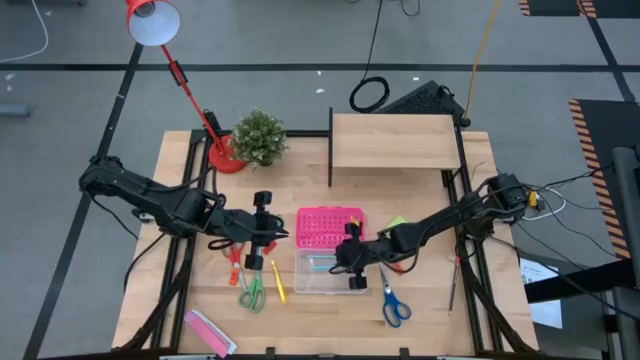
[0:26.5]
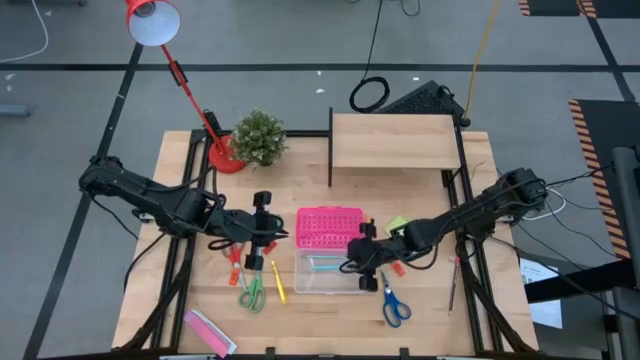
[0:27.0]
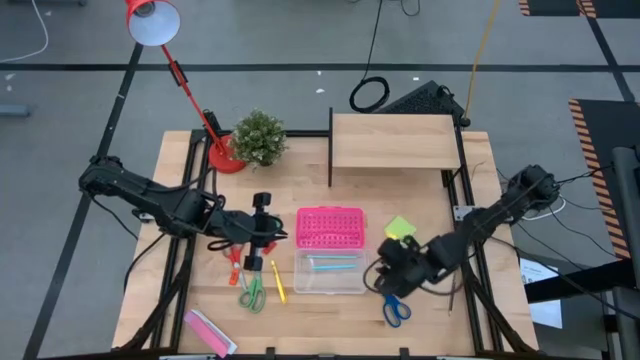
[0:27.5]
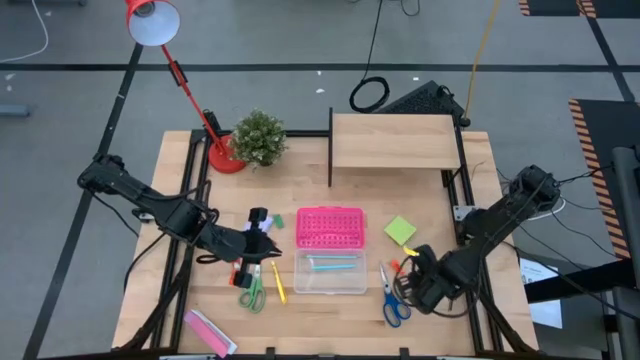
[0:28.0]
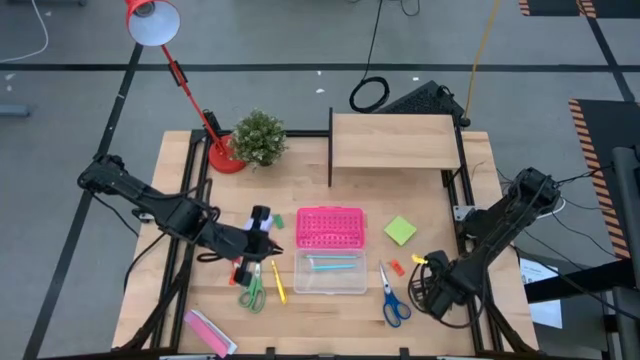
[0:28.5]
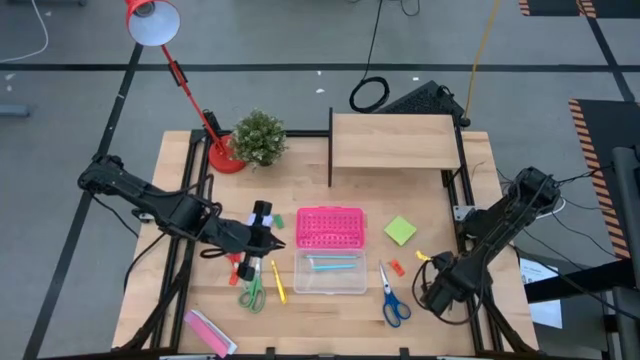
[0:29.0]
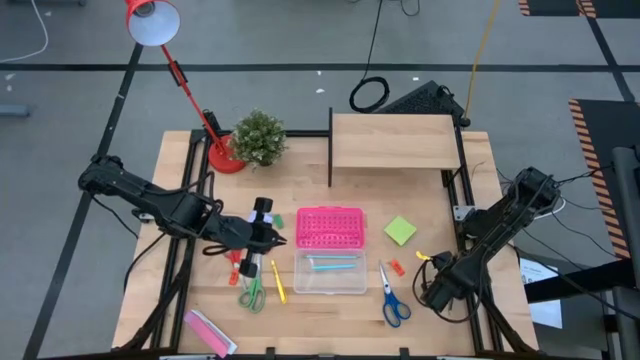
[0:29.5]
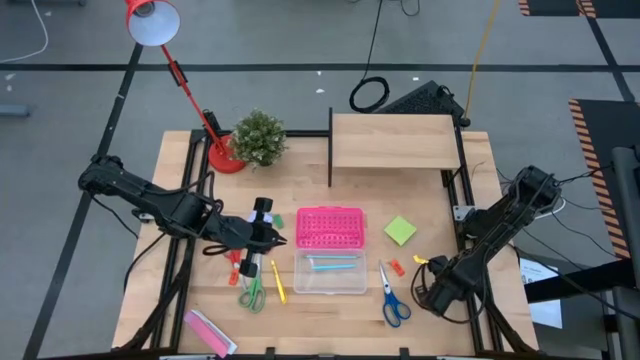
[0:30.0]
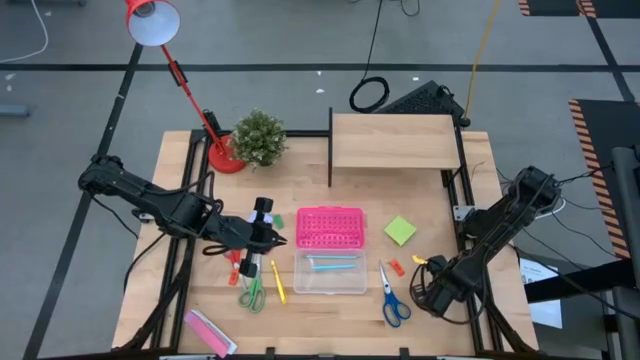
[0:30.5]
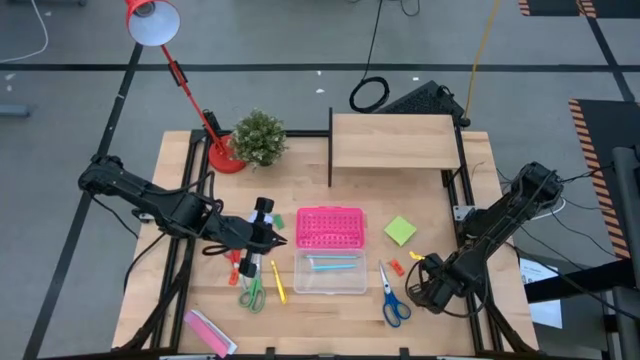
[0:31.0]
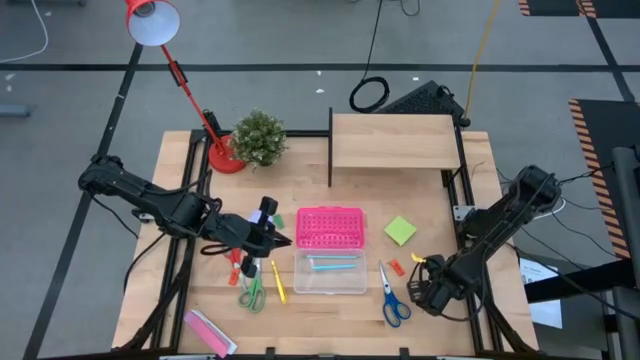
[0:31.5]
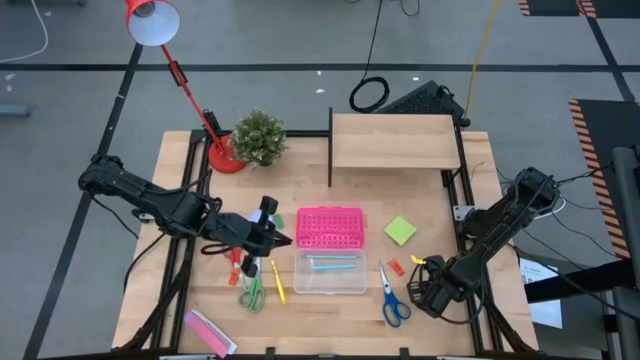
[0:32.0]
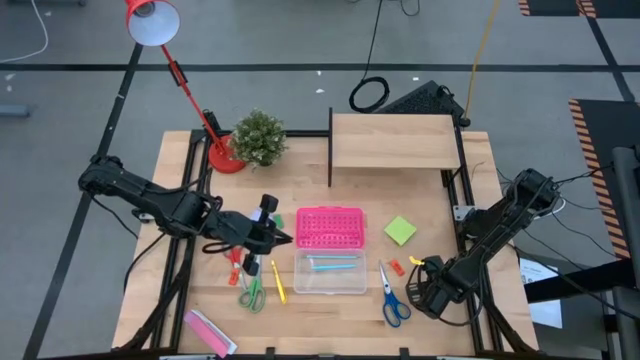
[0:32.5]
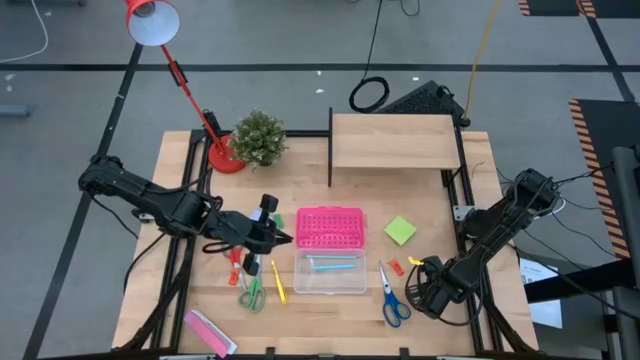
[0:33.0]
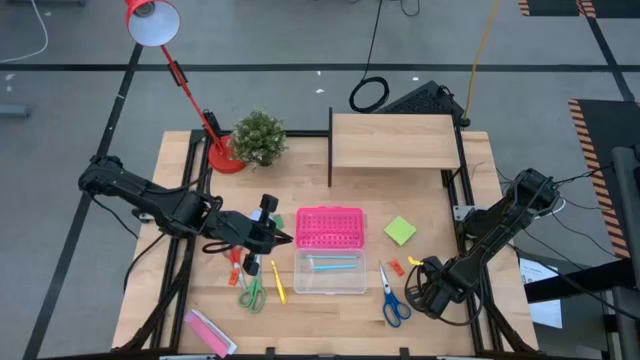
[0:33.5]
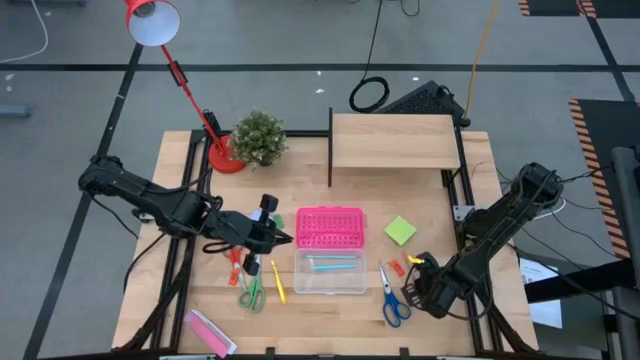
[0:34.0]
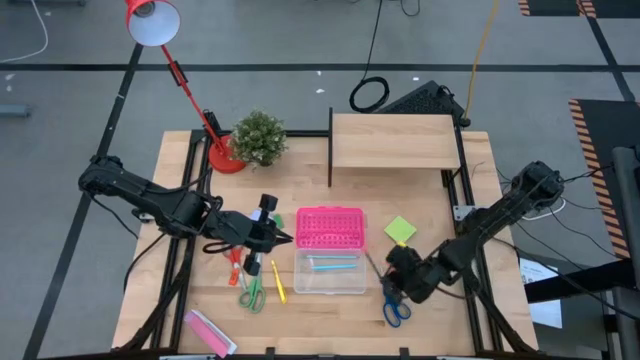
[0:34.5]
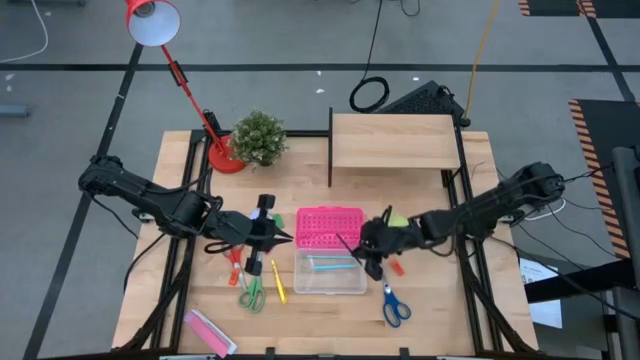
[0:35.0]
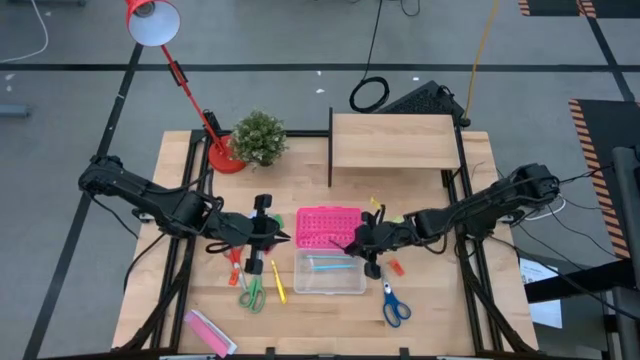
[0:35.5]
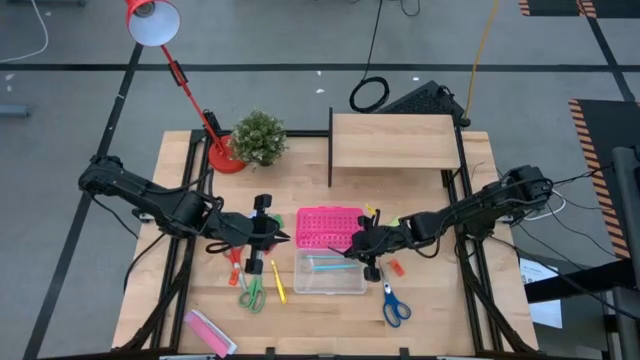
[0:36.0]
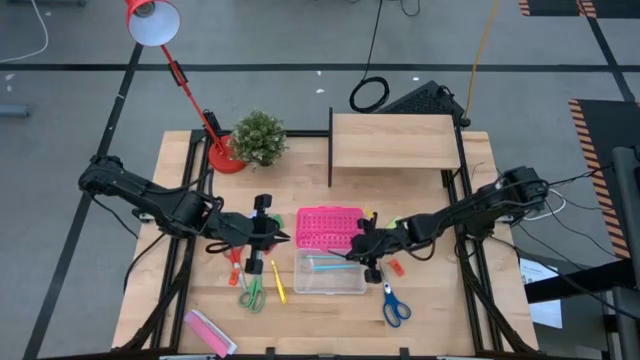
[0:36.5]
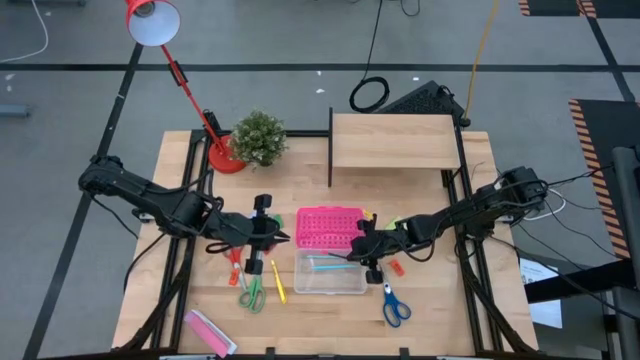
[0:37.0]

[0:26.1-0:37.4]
Task: Pack school essentials
Put the black pencil into the pink supply box

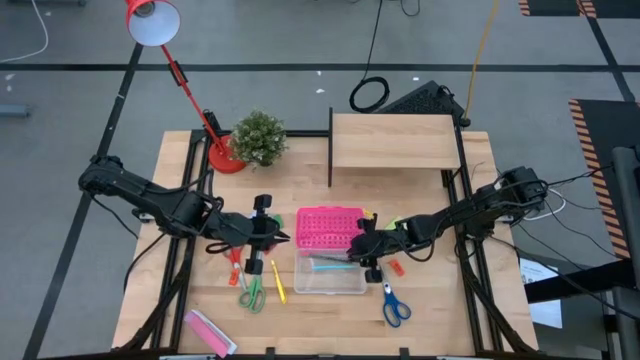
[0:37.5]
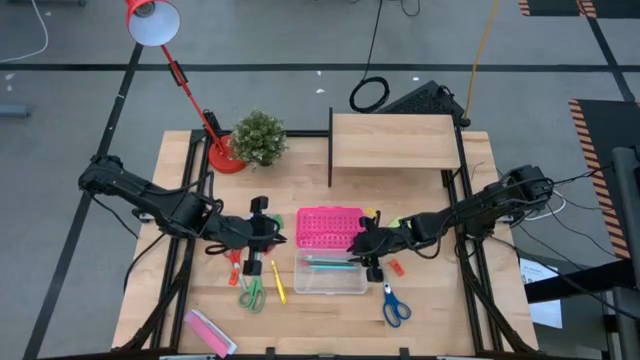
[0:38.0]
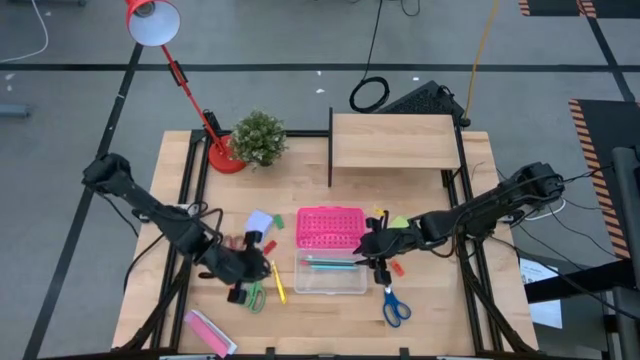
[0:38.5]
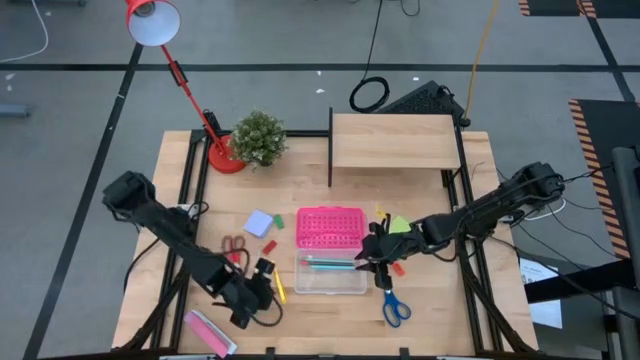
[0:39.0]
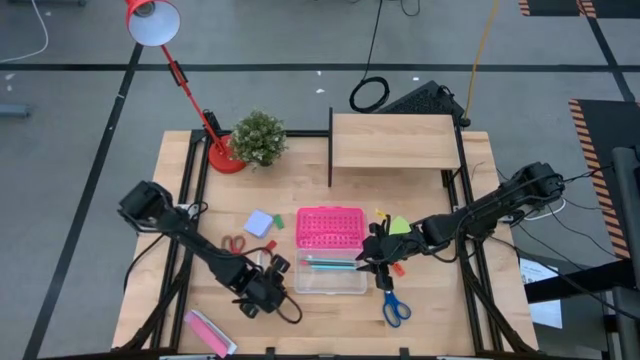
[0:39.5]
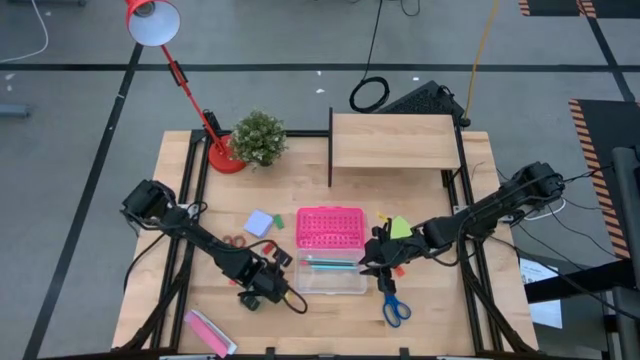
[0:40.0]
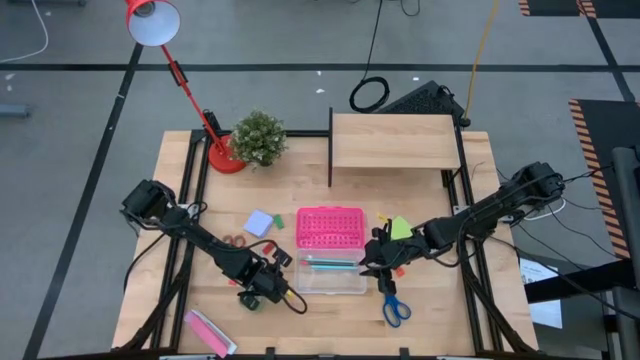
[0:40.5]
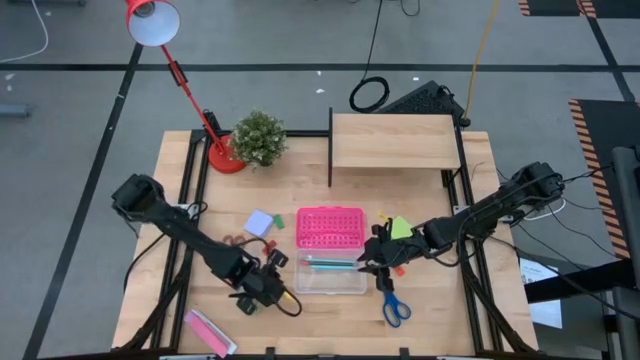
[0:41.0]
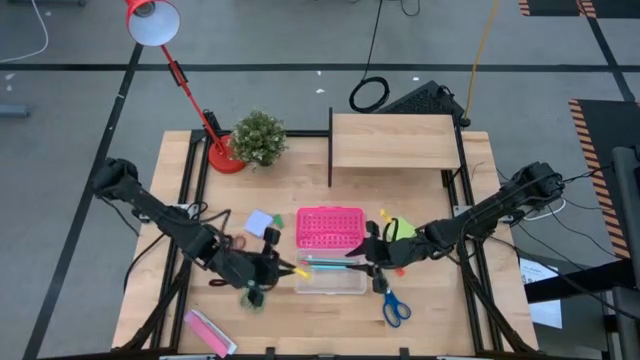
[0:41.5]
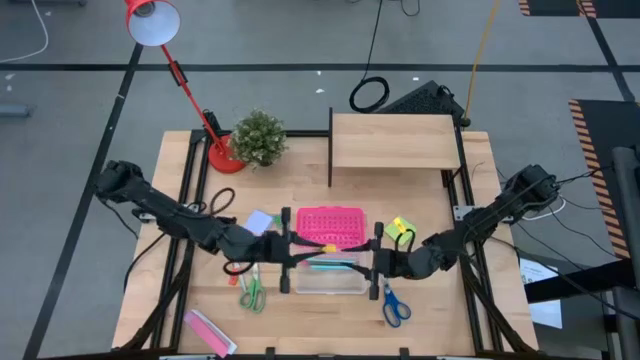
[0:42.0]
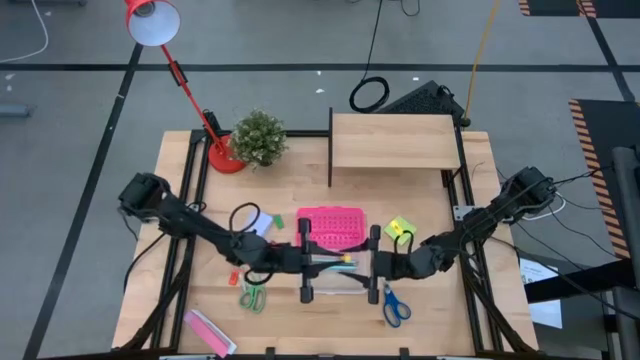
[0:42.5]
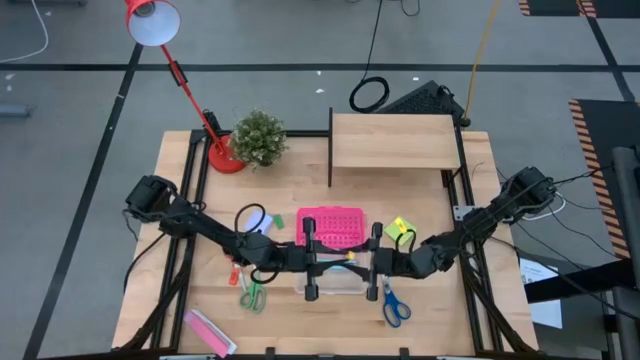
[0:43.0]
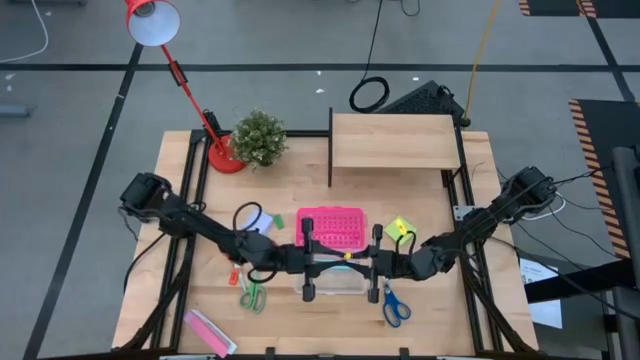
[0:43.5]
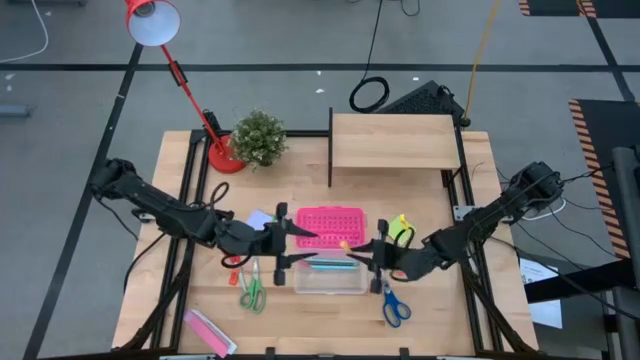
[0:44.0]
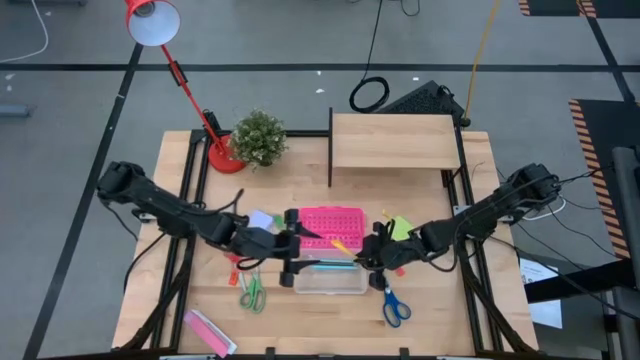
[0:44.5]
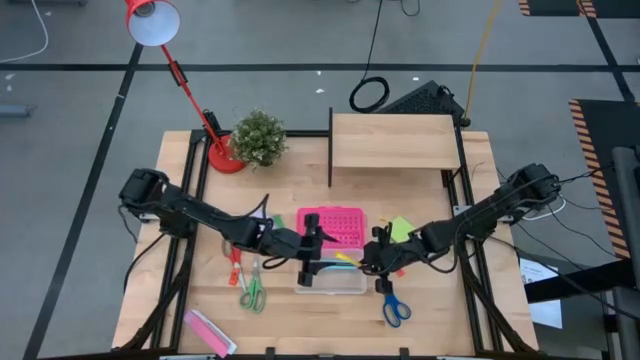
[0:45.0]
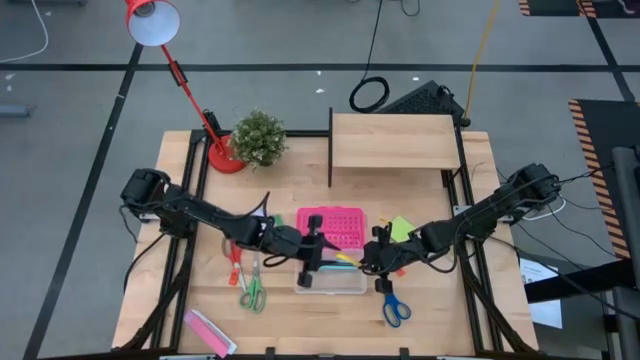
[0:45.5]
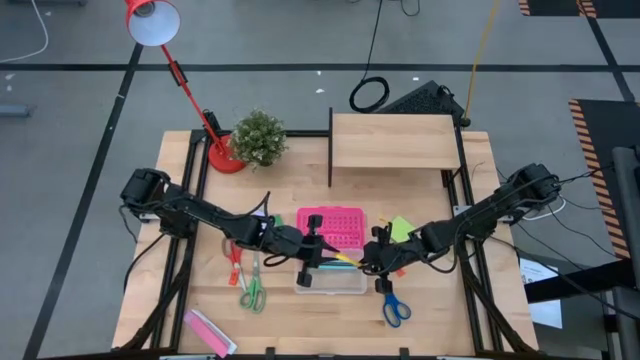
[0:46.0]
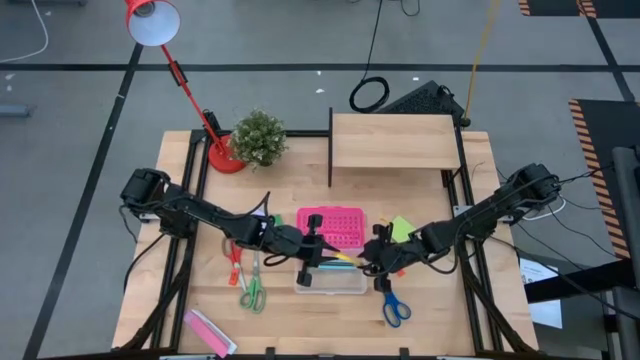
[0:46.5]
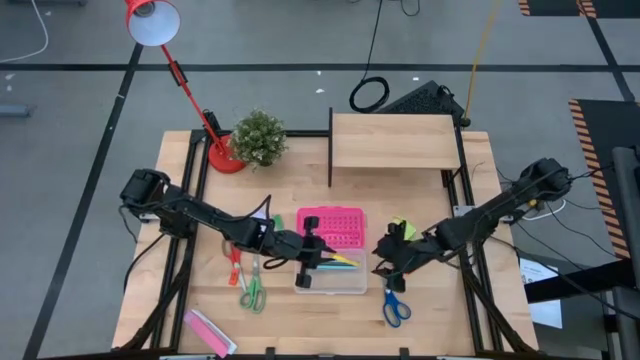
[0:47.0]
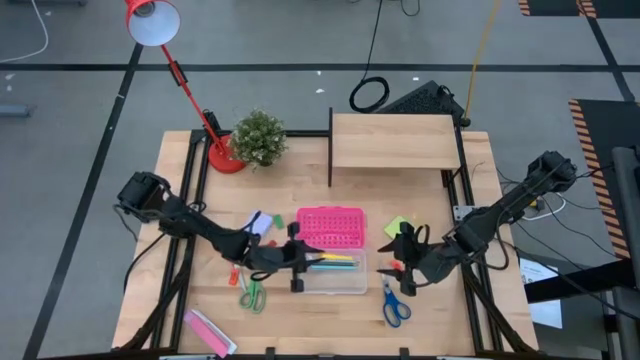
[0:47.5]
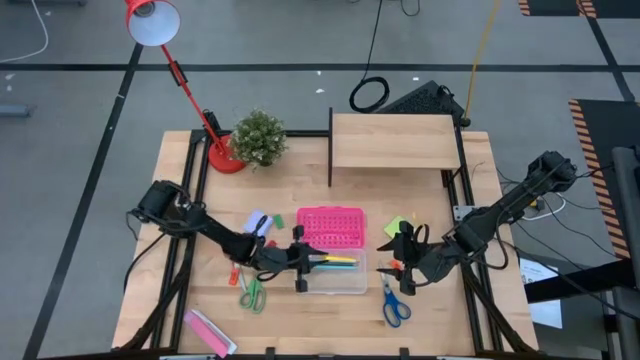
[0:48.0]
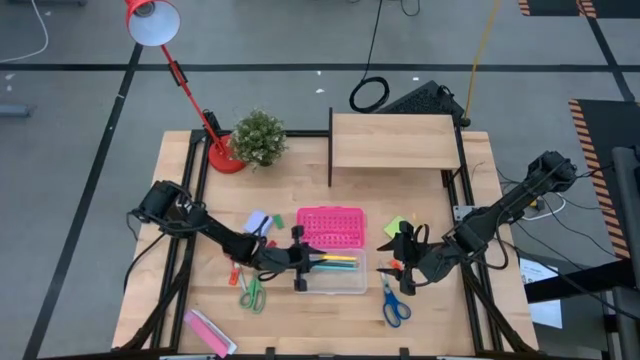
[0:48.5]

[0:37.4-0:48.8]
Put the yellow pen into the pink supply box
